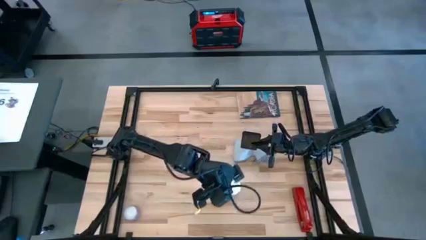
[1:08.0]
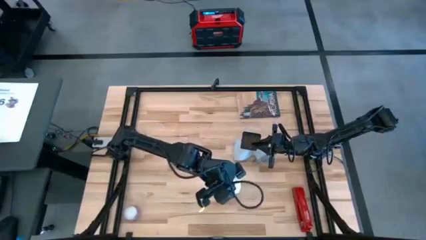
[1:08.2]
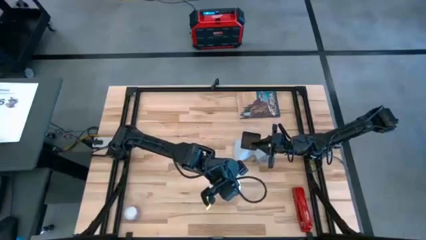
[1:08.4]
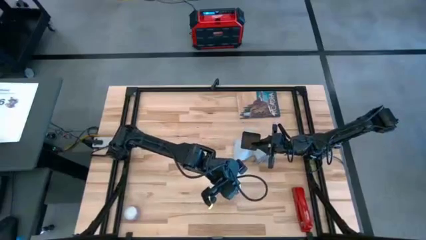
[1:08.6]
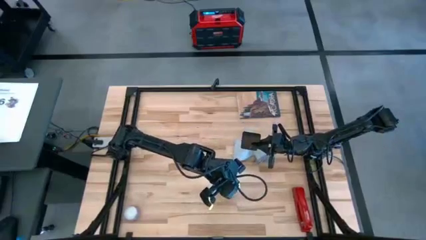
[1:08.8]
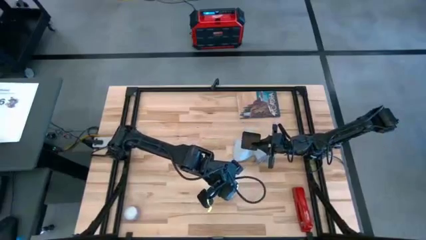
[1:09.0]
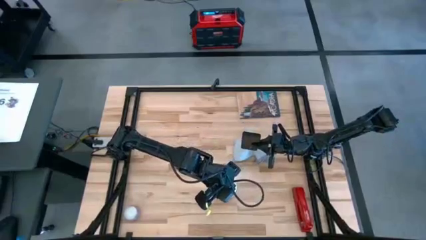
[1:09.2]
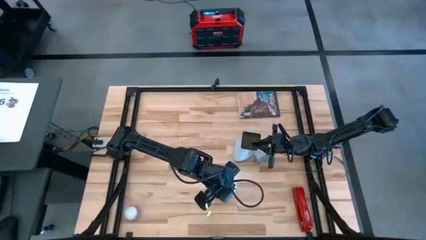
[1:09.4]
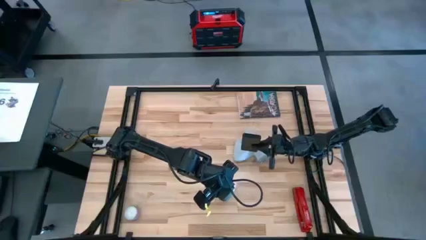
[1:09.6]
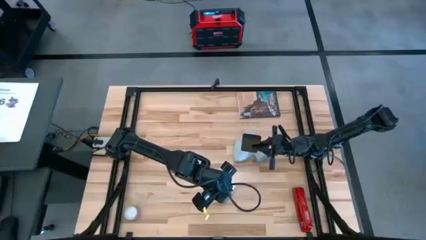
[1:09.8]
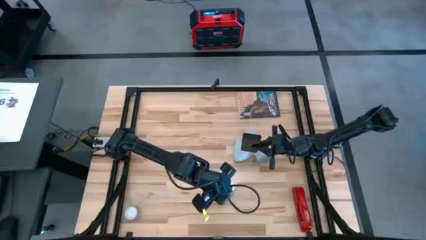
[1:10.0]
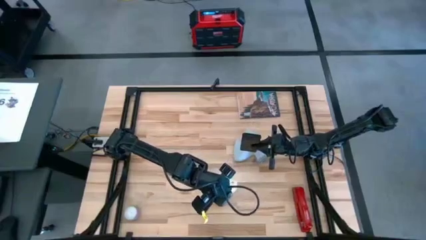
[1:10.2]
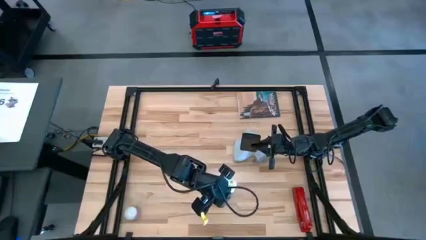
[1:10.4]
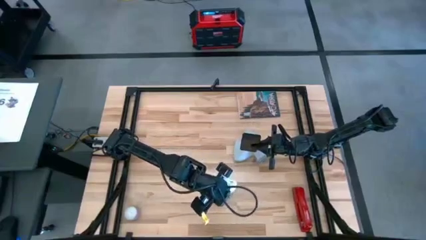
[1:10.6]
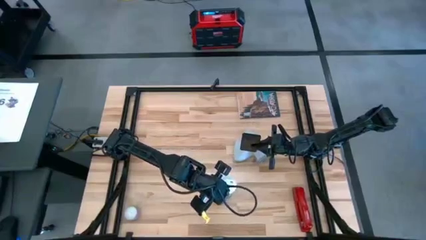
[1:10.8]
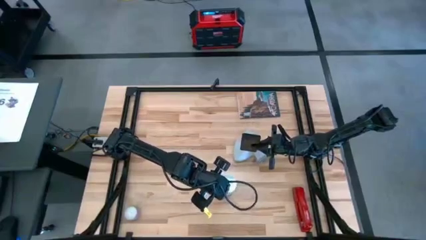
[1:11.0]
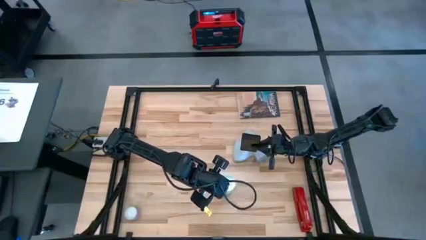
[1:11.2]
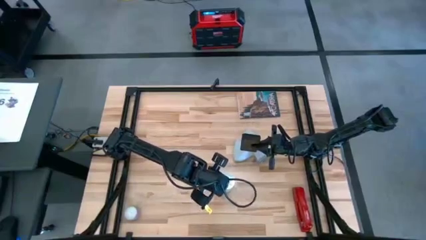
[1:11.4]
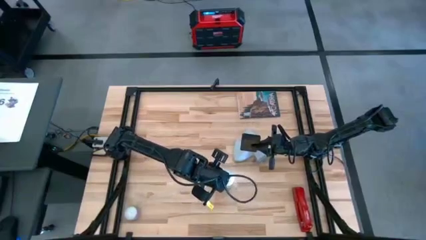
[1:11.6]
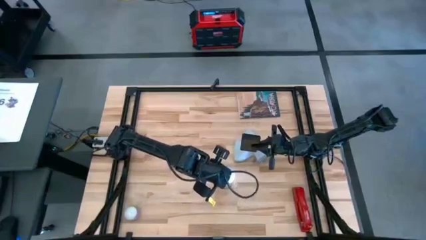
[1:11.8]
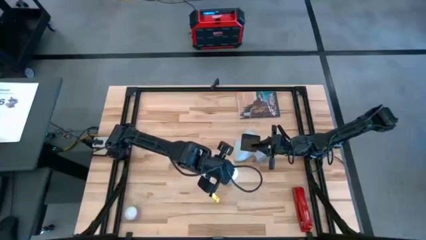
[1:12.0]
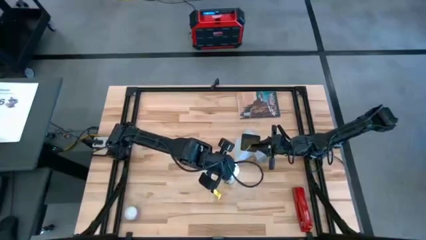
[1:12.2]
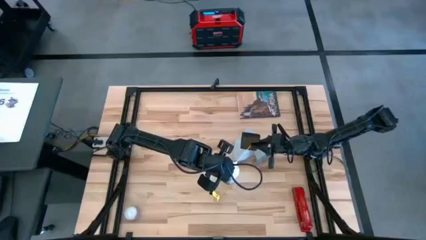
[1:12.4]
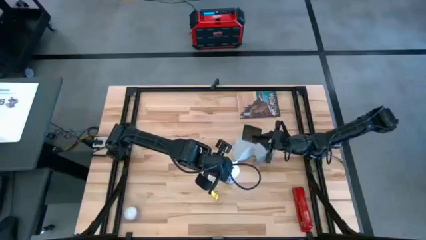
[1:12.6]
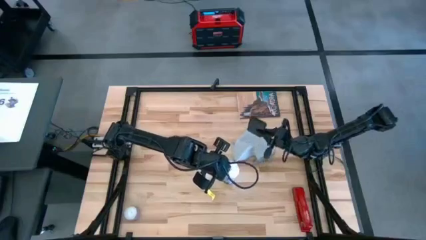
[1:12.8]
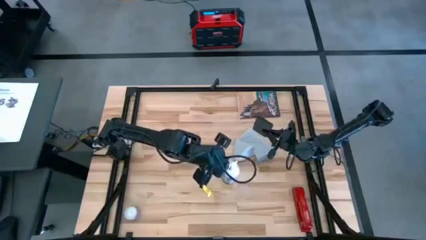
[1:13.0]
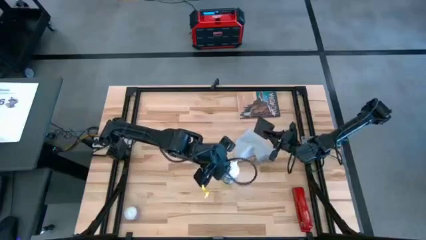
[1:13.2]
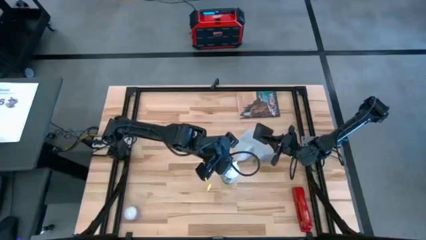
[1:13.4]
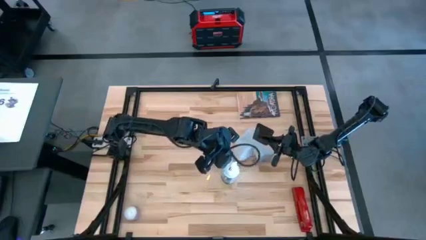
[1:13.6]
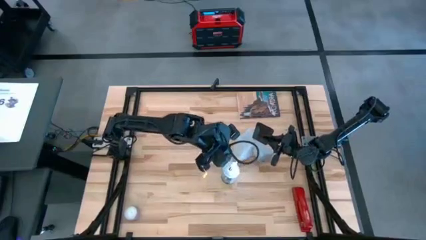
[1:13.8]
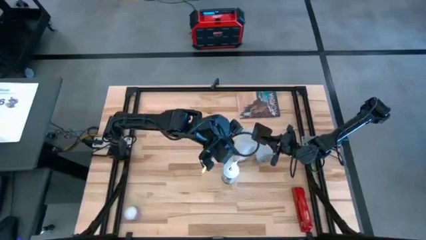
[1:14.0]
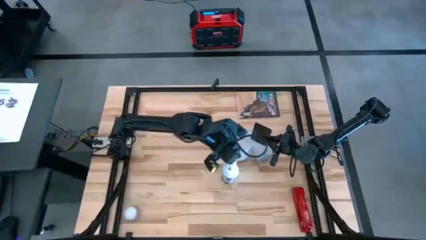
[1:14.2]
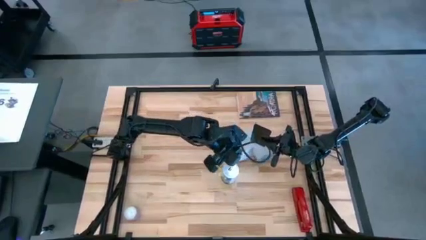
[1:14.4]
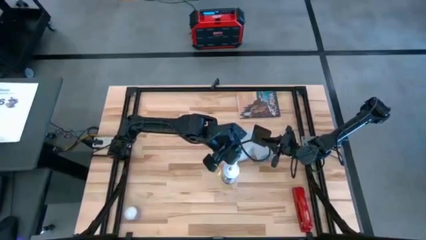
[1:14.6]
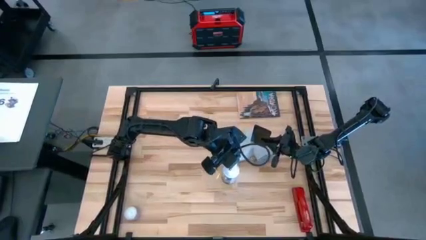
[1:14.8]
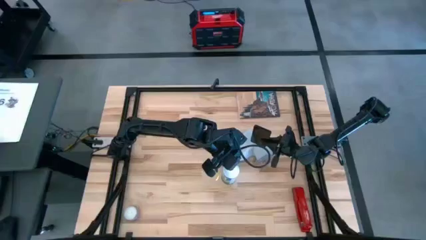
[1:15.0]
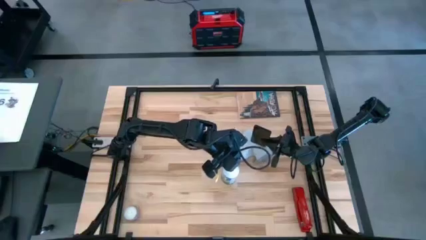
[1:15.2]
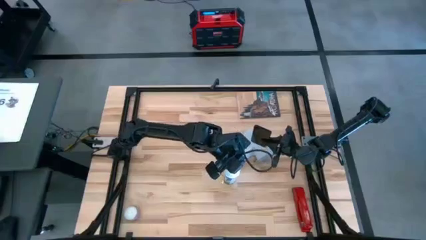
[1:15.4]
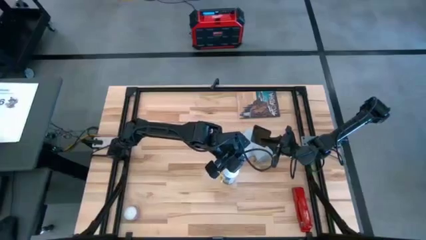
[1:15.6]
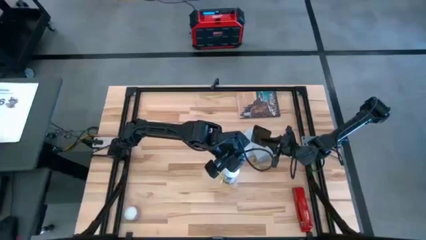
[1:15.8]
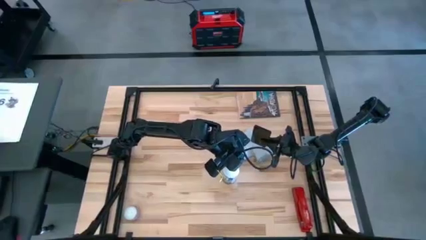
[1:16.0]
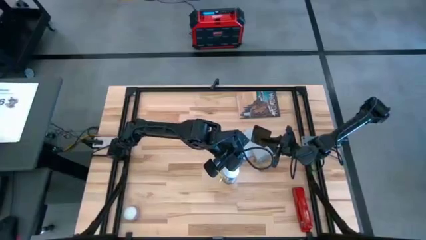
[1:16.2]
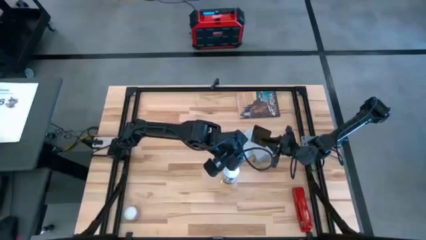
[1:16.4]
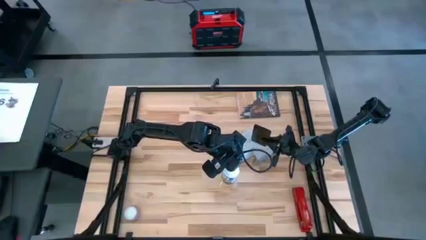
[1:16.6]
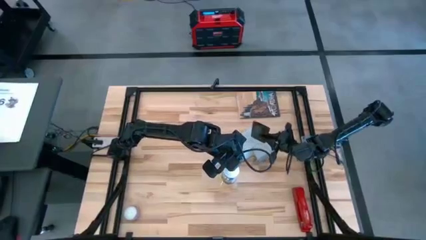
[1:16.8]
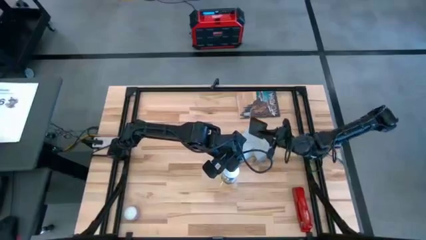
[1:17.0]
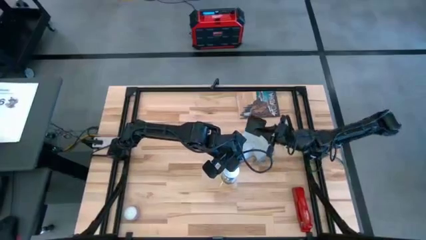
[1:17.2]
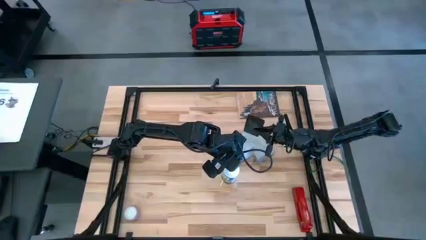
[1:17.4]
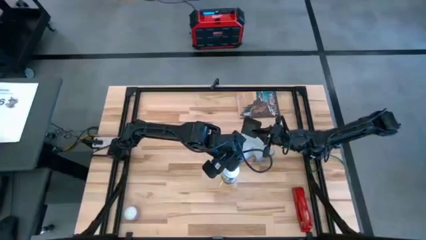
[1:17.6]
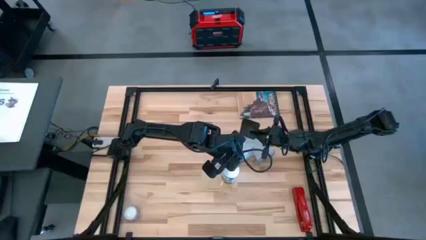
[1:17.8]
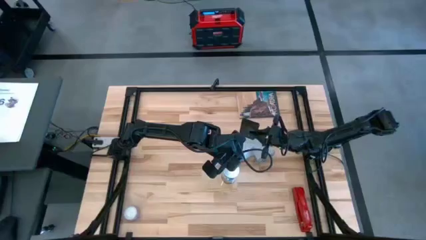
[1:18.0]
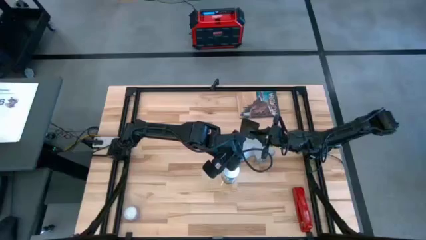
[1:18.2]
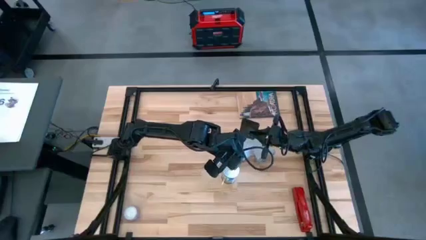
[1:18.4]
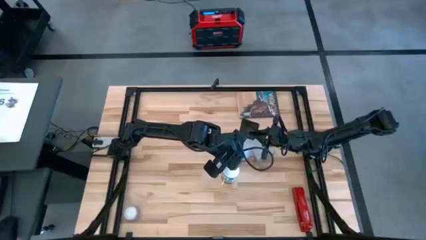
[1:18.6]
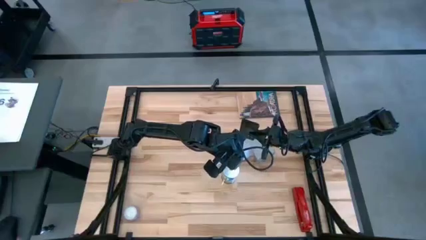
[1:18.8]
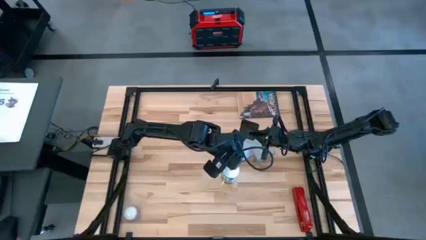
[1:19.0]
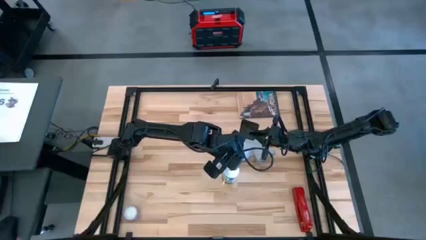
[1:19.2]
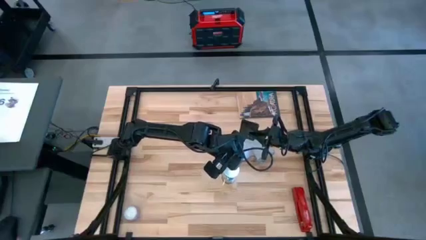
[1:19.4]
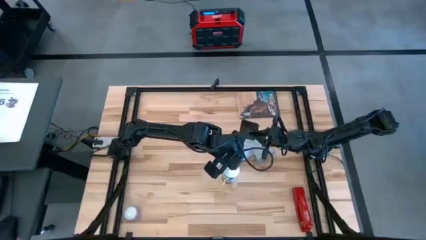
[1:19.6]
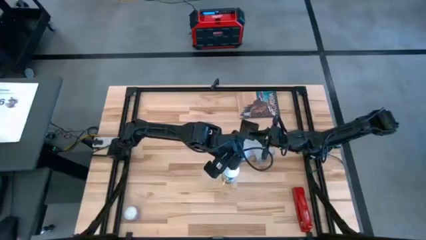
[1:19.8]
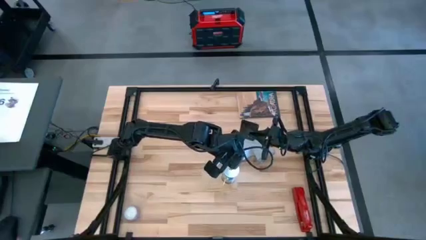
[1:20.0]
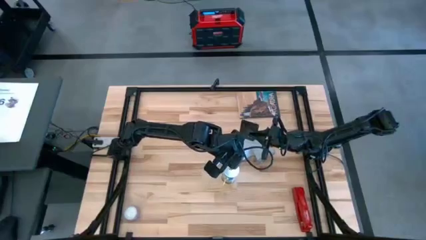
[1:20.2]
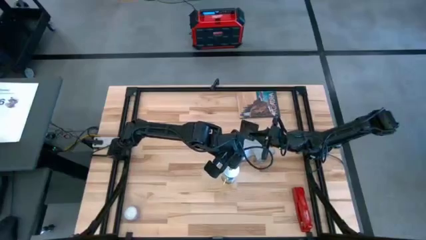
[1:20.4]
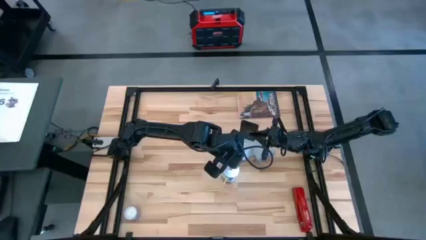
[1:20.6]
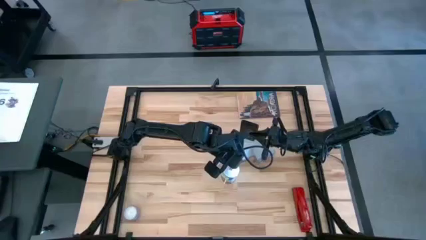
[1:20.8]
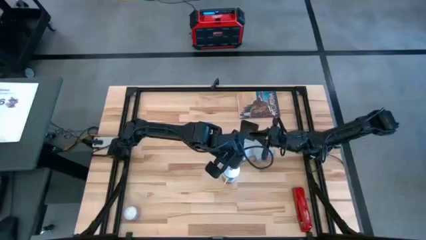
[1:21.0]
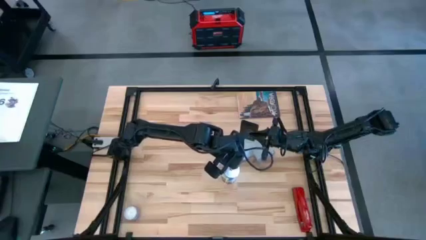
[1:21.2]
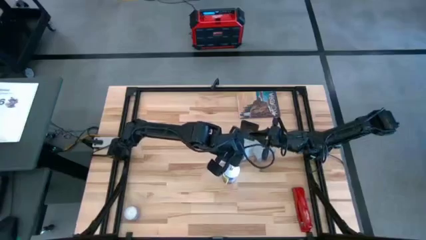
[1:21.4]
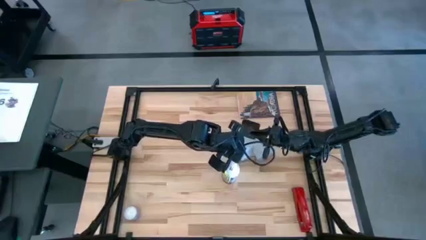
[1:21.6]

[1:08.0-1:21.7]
Task: Apply microfiber cloth
Spray the back of the black cellphone using the white spray bottle

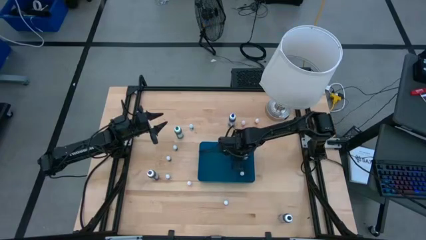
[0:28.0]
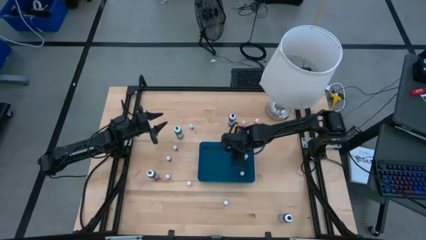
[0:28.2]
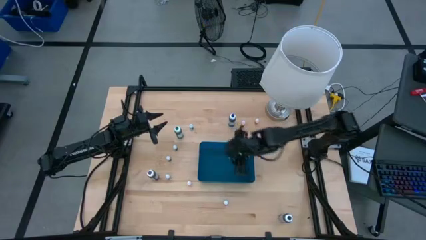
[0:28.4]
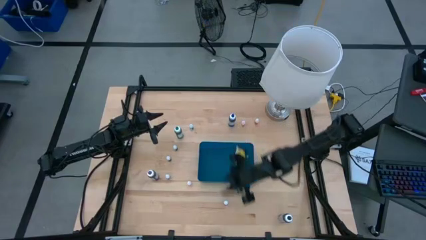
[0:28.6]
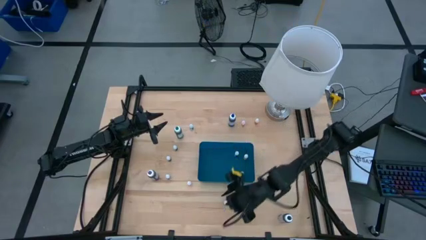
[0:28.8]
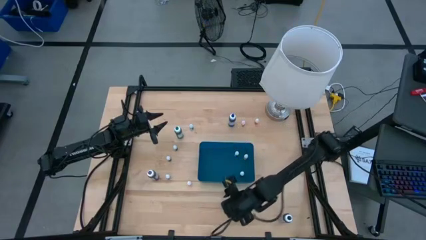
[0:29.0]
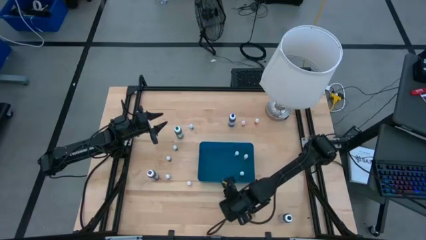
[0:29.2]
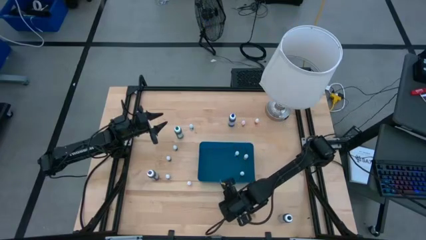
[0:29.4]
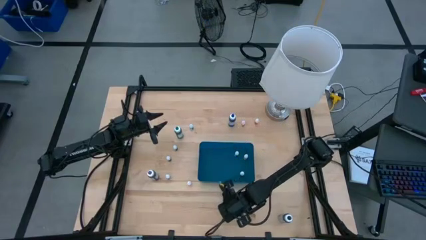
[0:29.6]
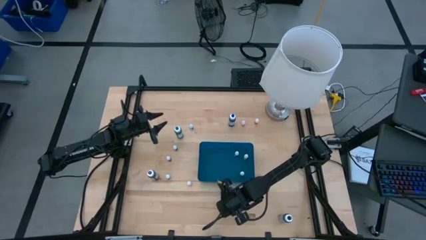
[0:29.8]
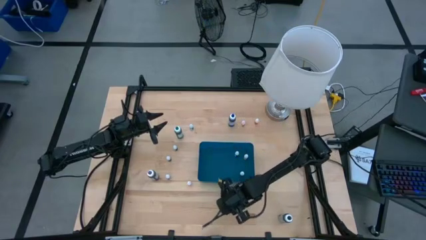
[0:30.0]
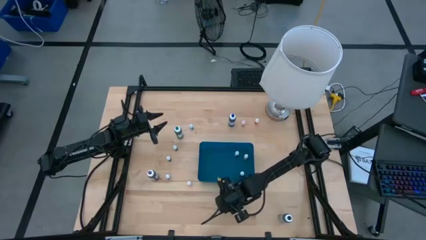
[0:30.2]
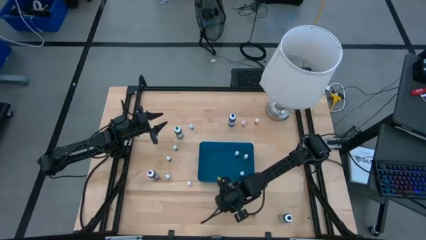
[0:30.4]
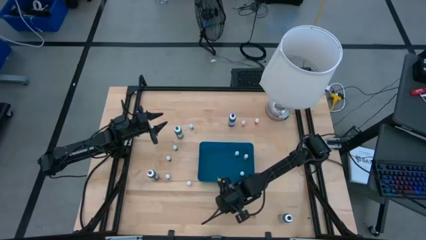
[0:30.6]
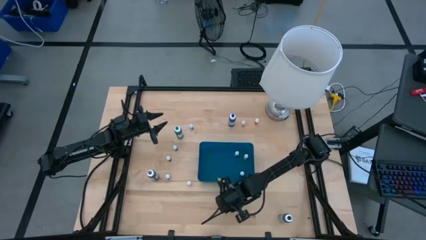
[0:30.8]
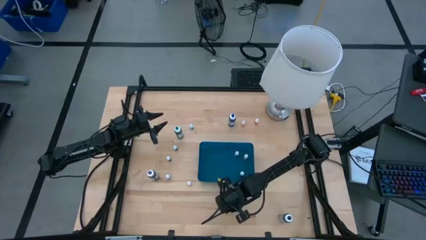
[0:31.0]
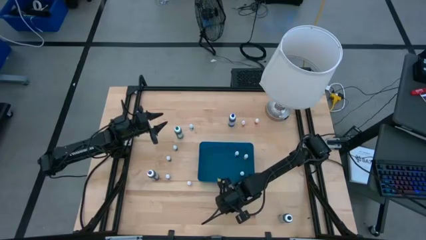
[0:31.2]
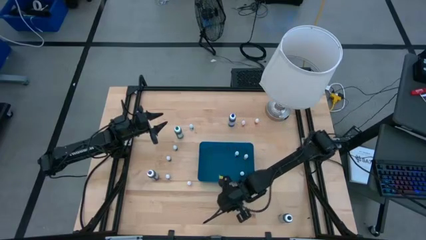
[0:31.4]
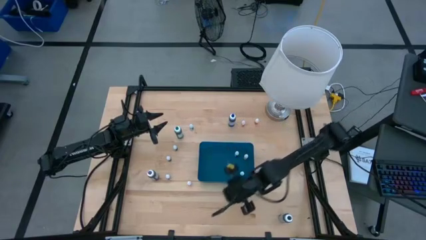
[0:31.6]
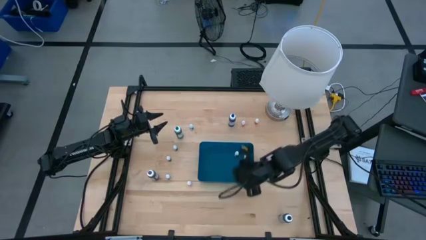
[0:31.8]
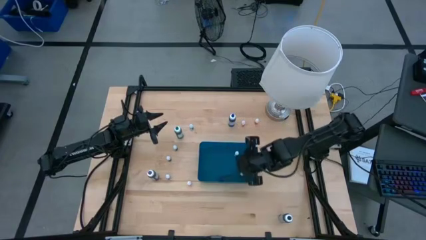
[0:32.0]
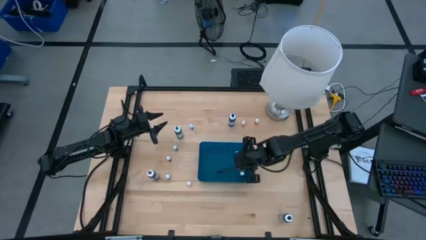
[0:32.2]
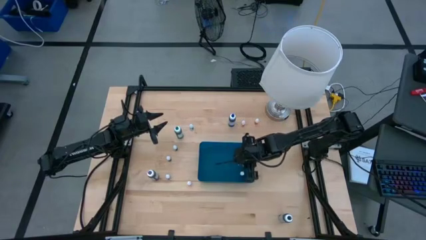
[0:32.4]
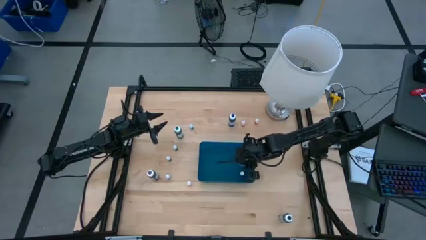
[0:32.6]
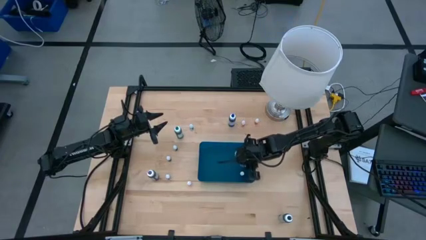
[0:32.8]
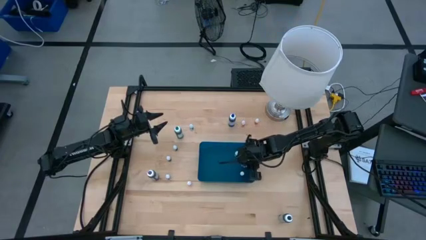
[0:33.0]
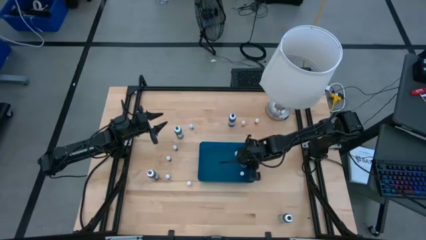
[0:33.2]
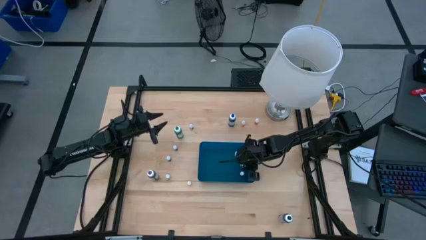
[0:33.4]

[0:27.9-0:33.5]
Task: Pick & Place food coloring
Put the small red food coloring bottle into the blue bin
